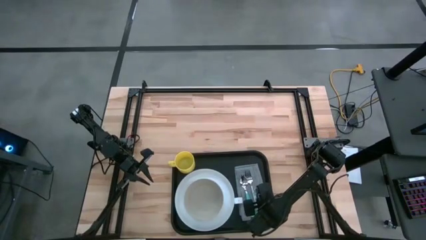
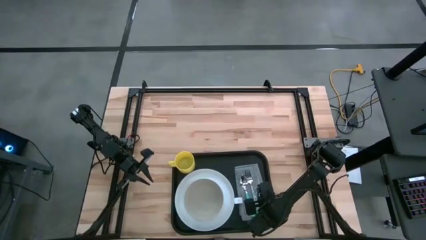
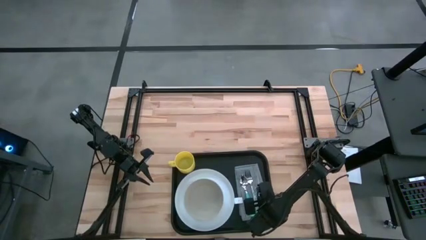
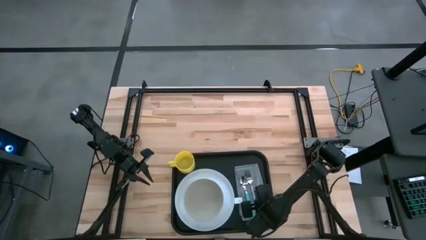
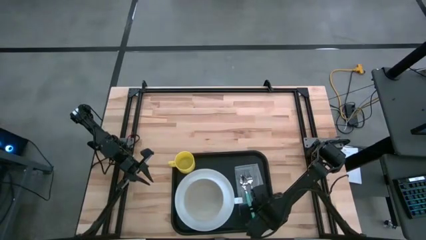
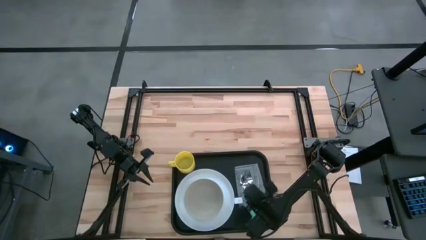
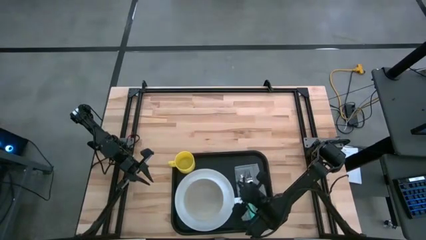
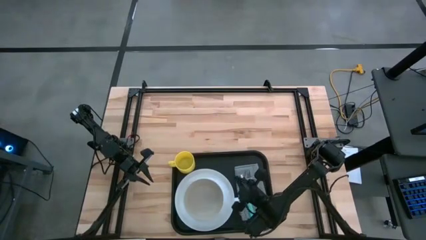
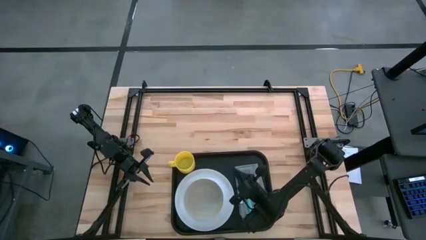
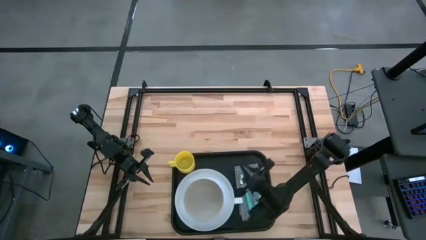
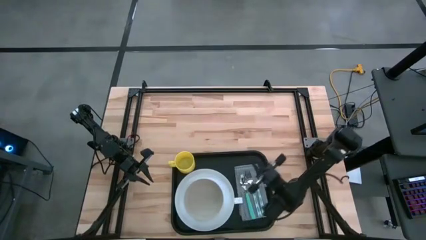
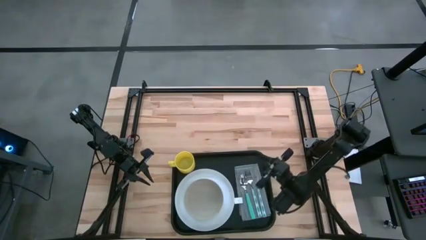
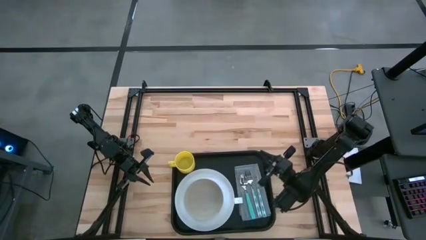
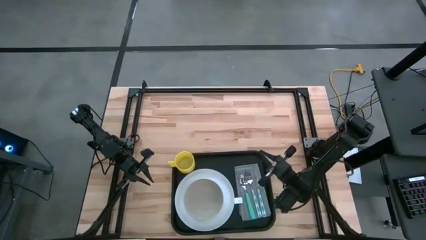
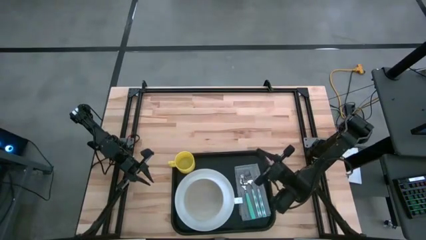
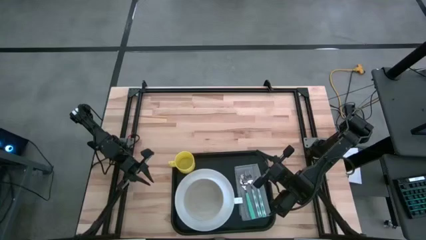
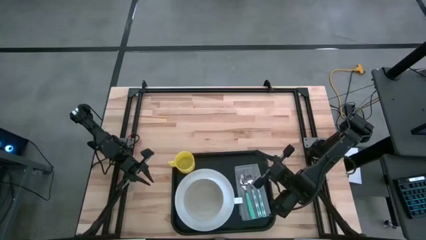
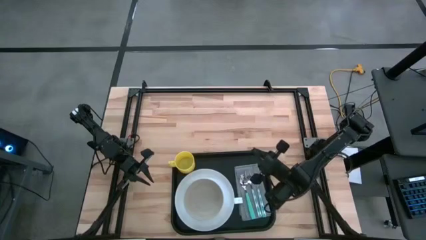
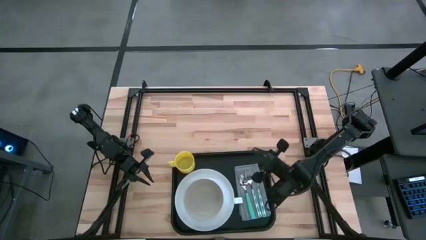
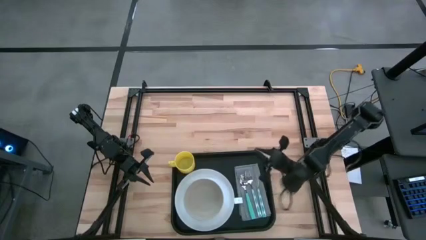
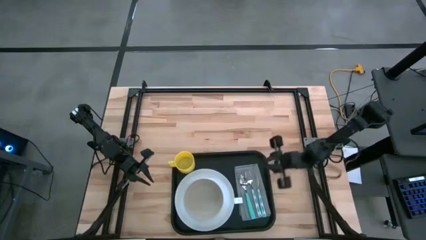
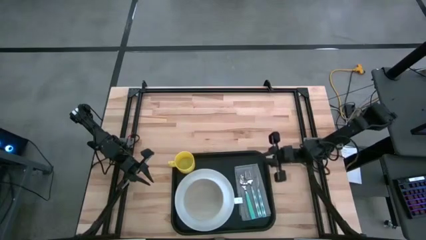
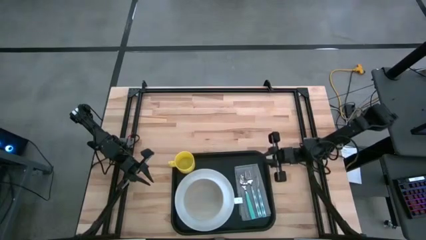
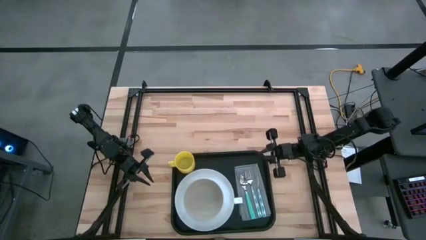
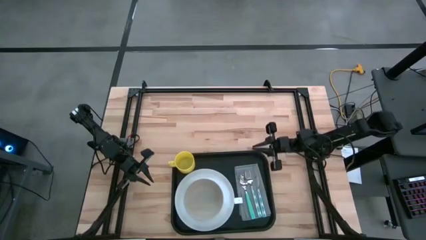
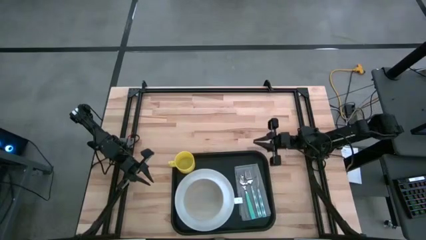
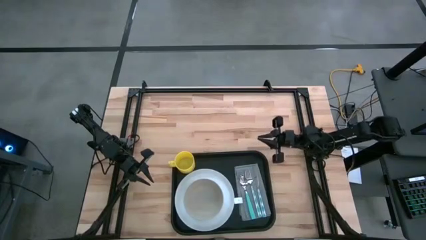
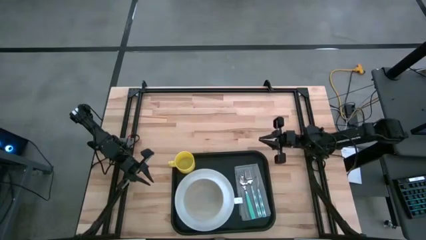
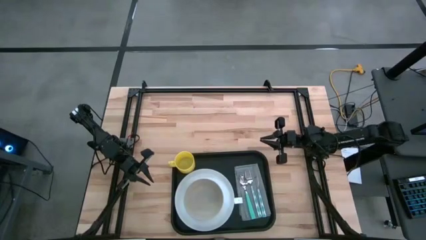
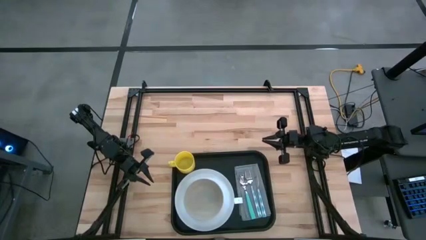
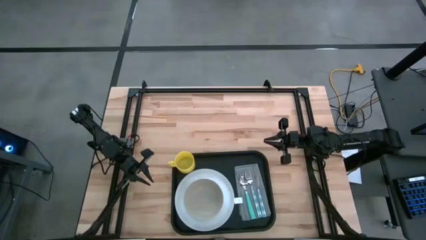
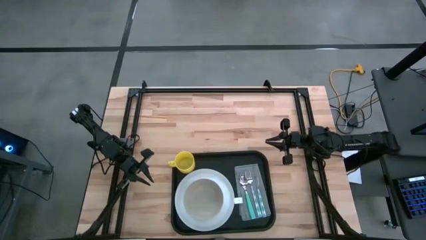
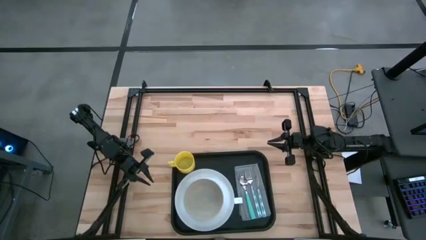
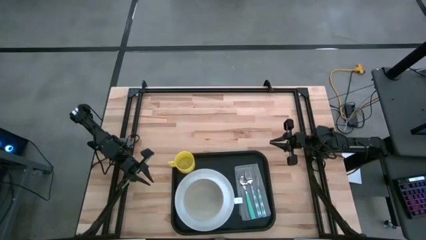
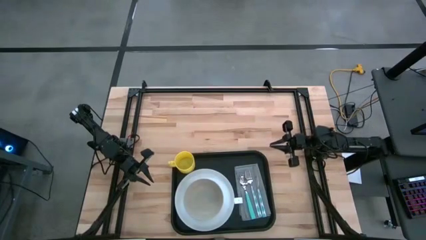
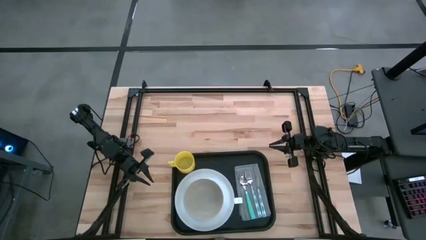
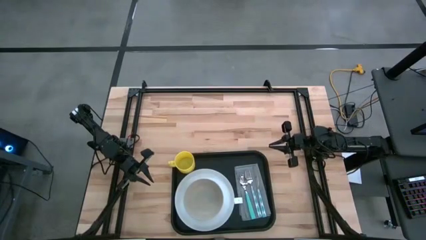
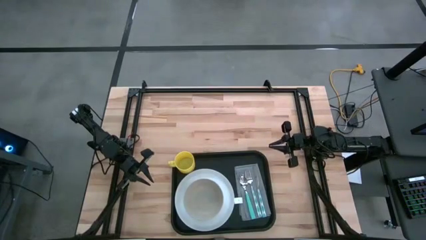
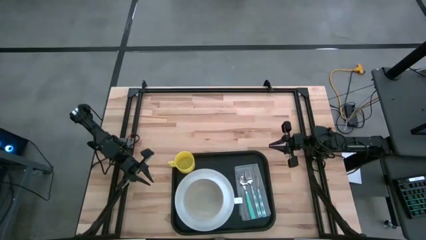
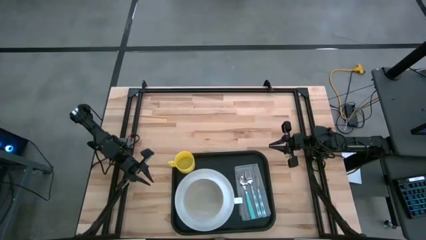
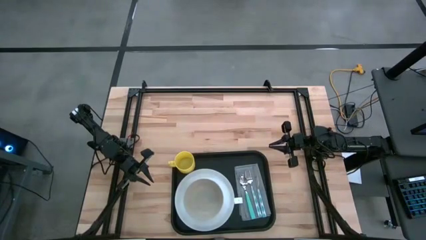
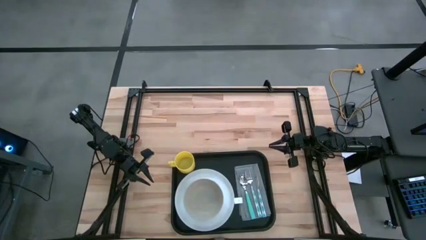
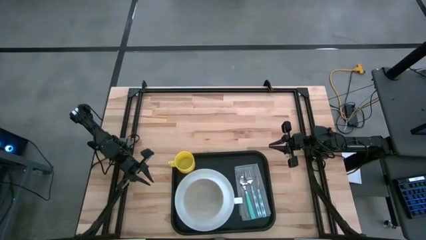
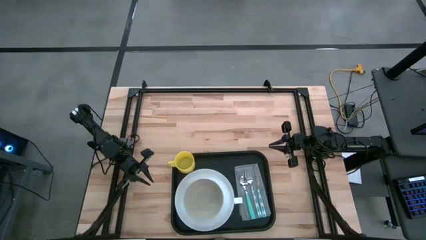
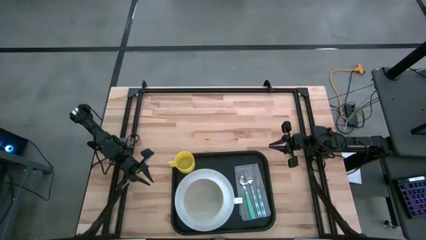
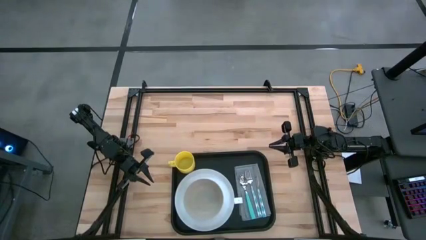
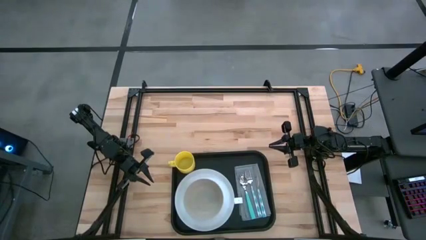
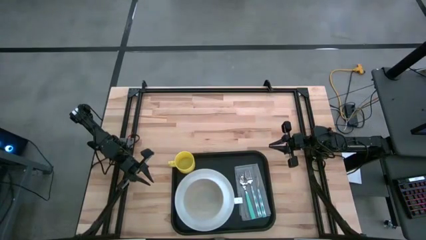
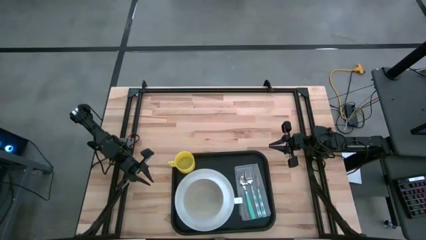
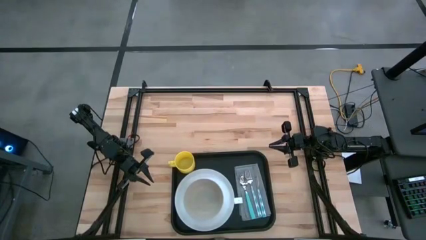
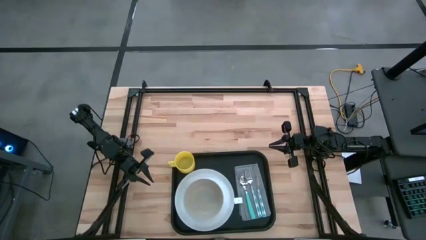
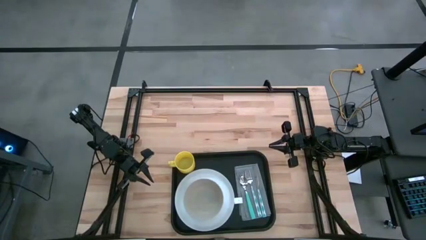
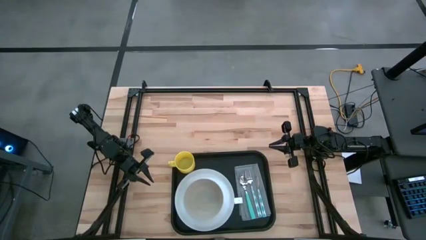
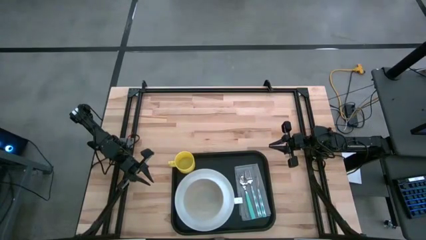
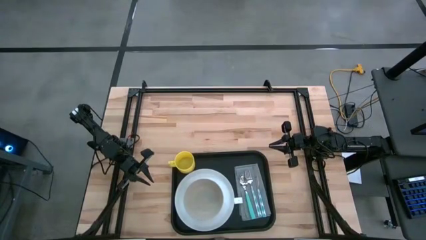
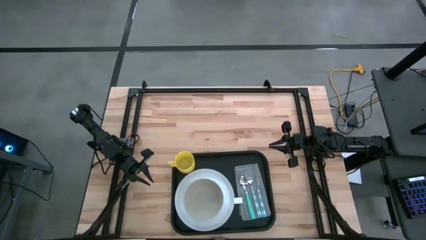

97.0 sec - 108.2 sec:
Task: Set up tray
Return to Home Position

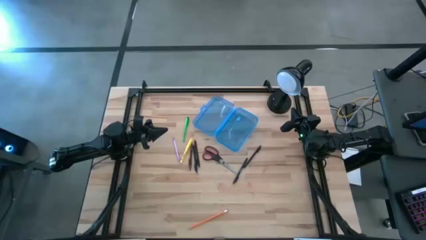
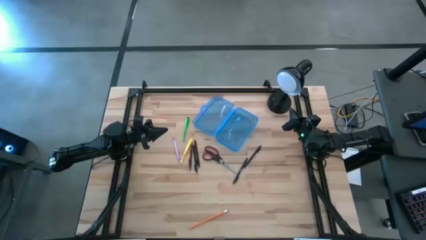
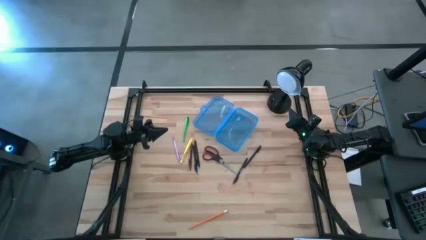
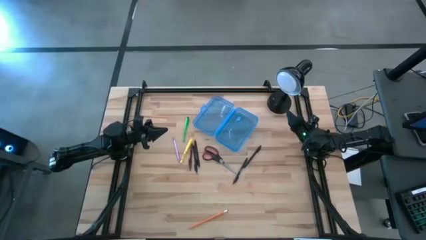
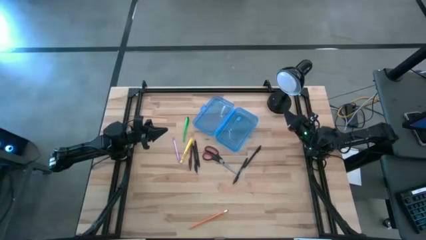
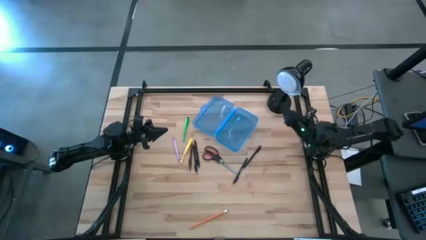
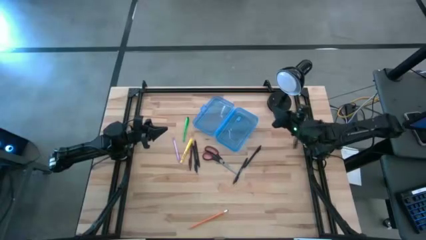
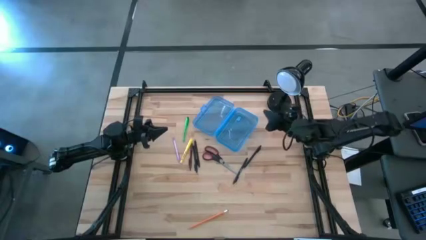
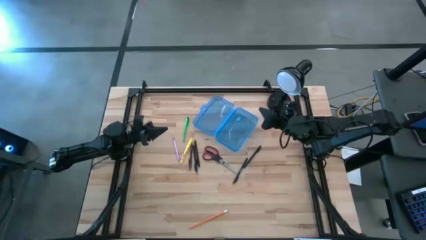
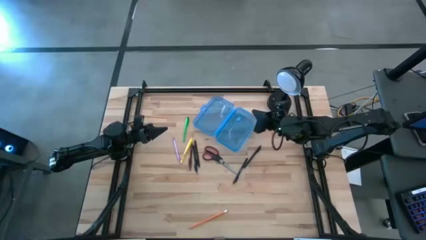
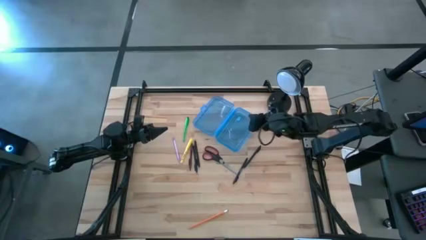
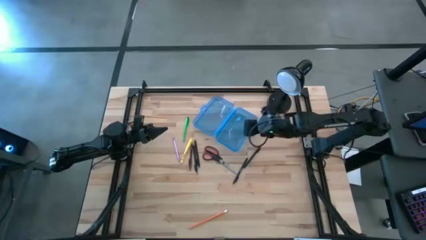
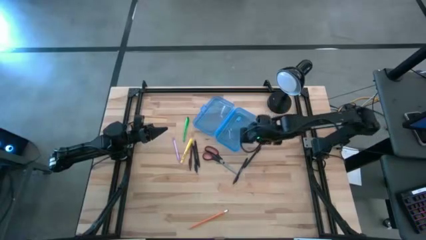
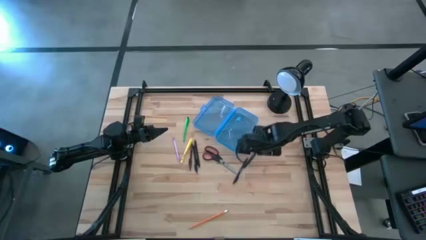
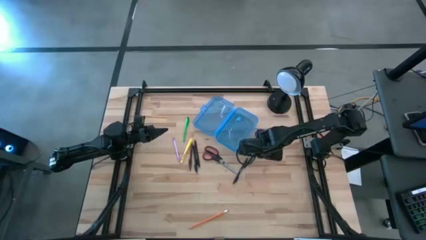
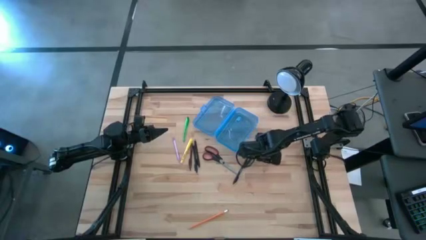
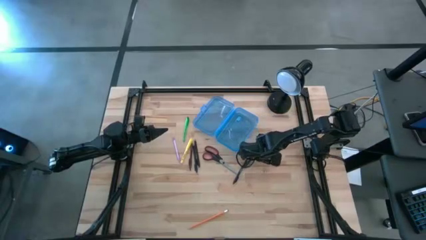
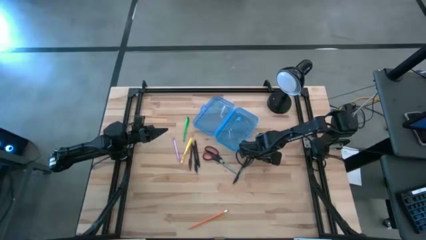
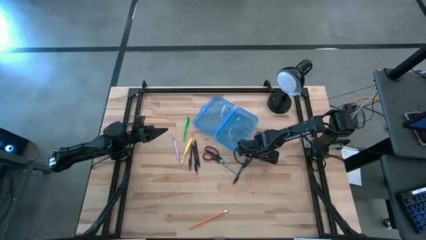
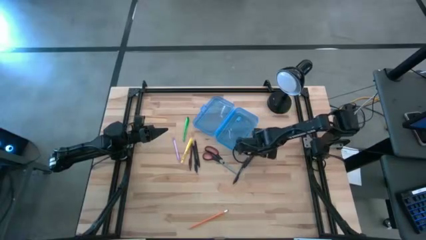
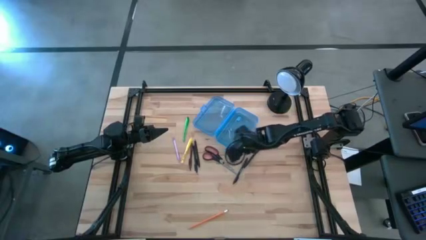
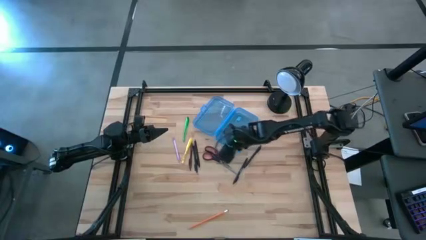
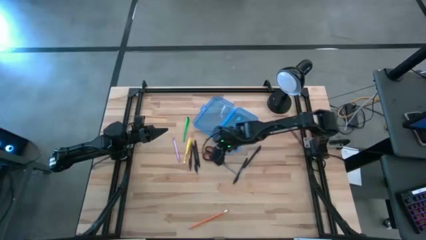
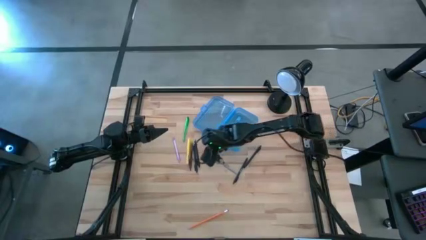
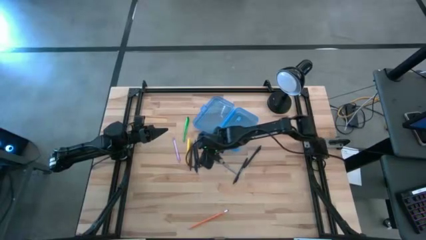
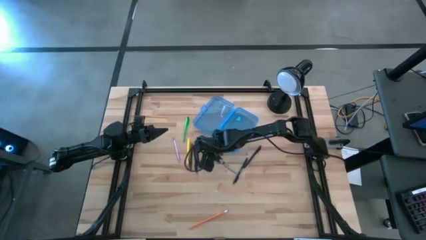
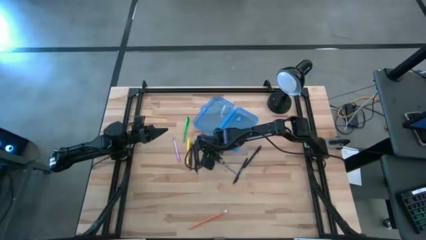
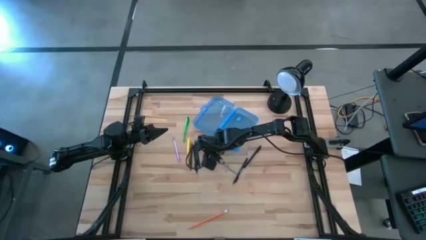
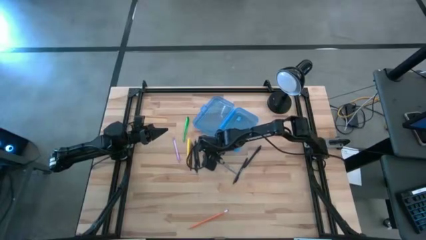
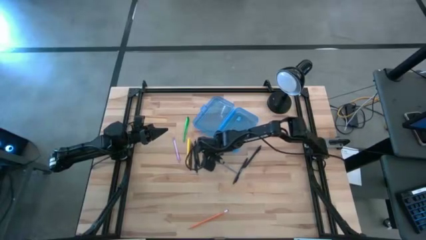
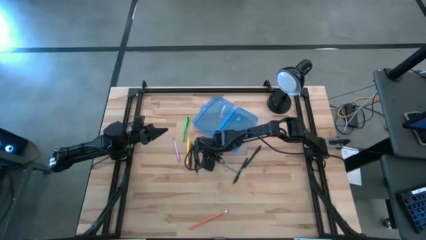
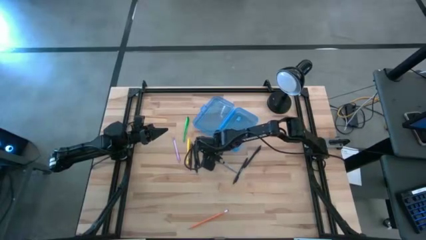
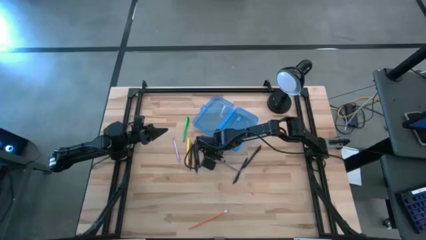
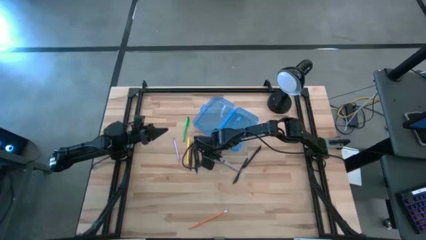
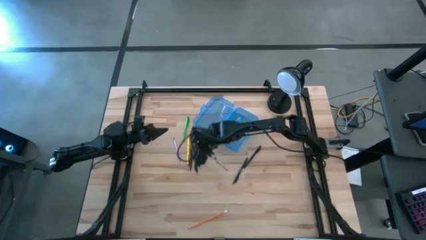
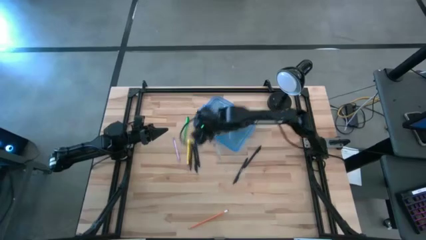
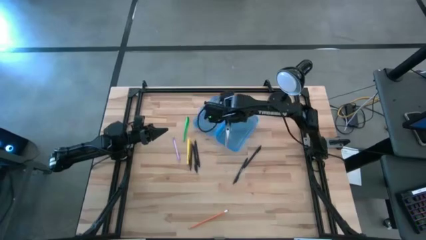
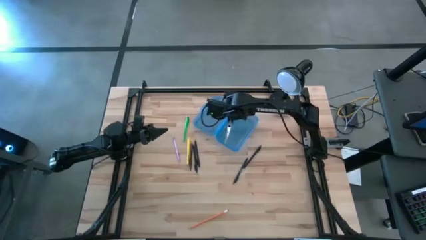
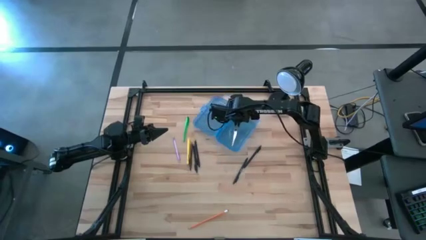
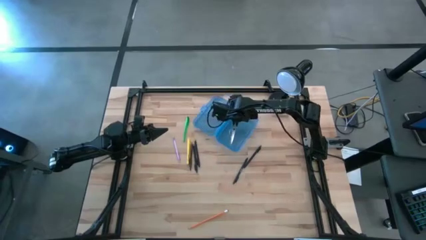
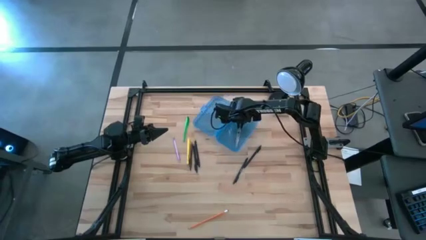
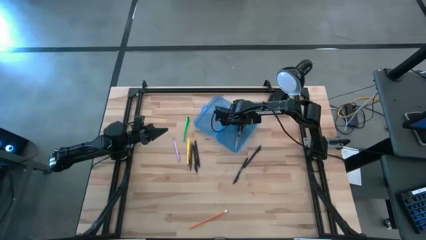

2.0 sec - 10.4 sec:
Task: Pick & place school supplies into a supply box
Put the black scissor into the blue supply box
